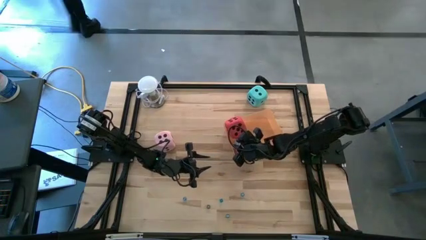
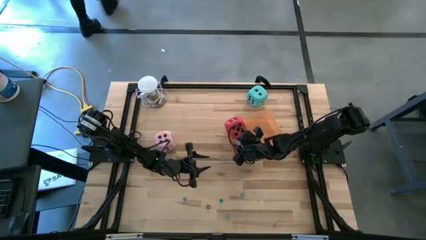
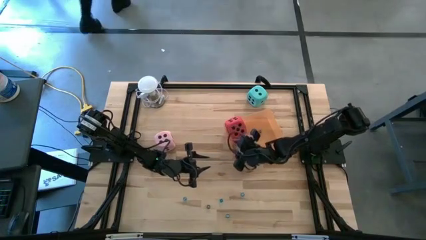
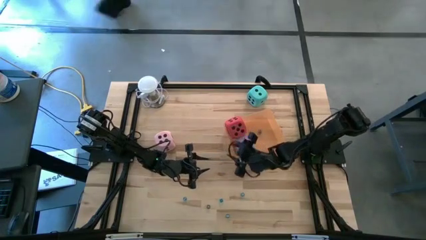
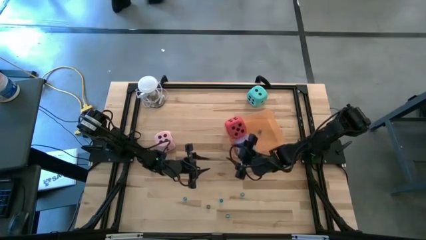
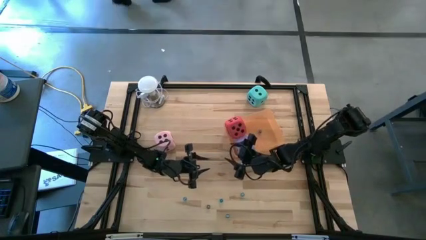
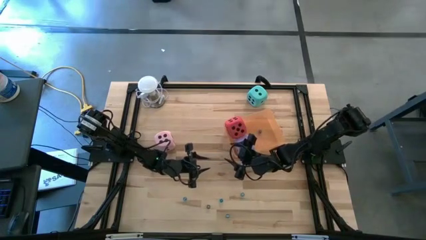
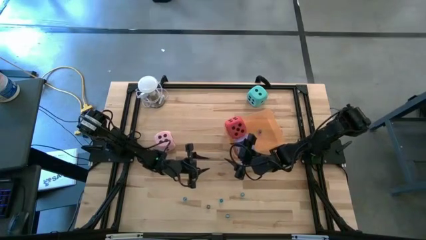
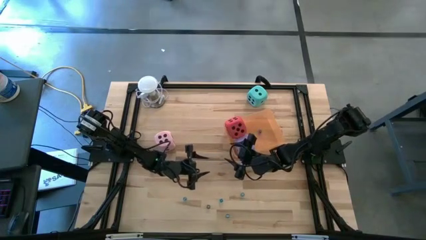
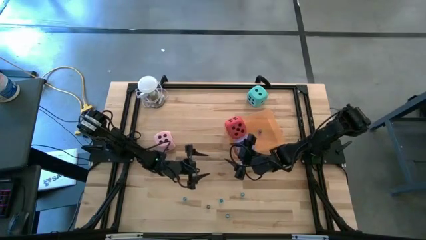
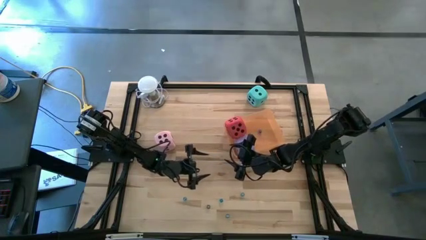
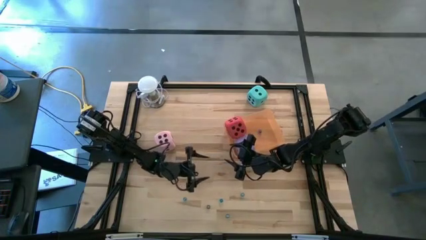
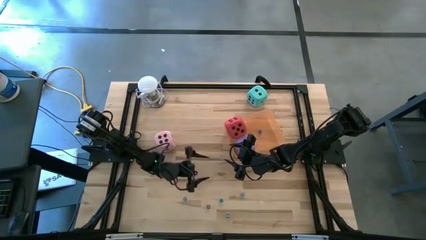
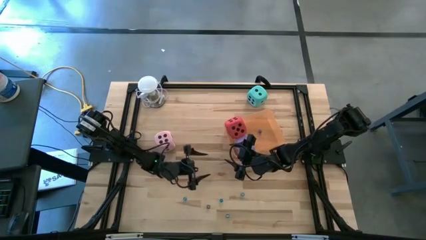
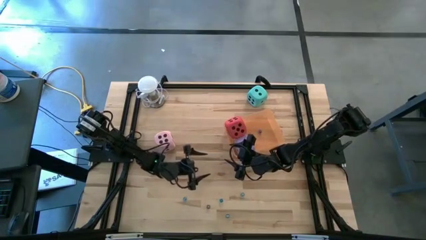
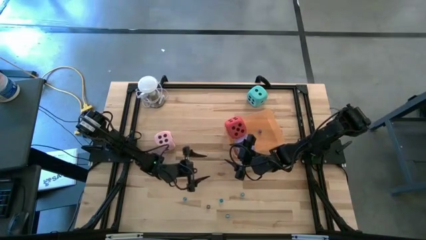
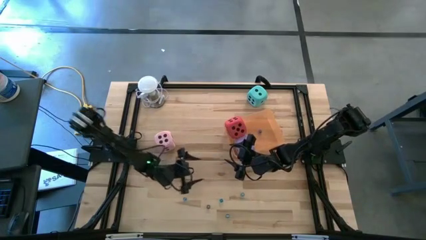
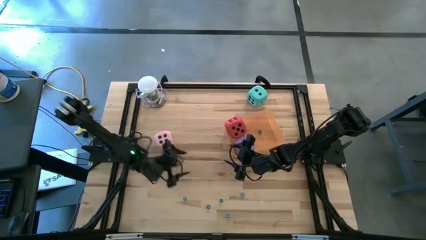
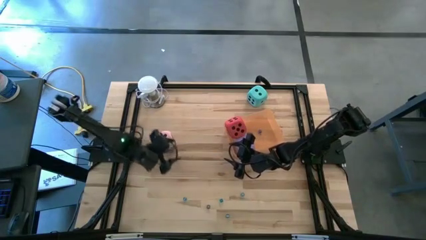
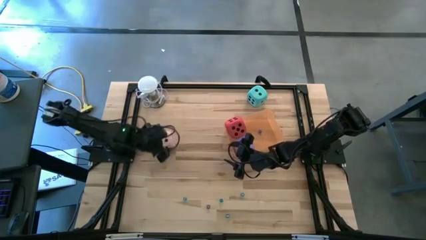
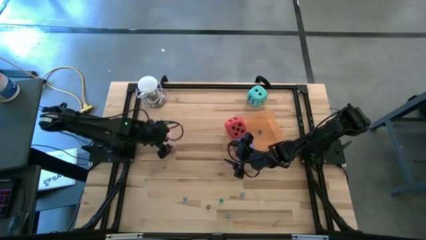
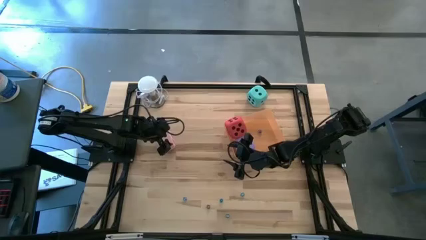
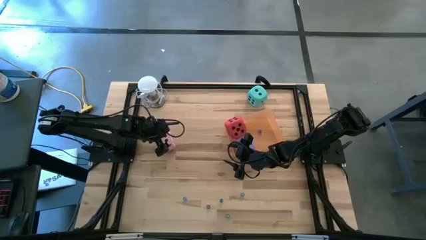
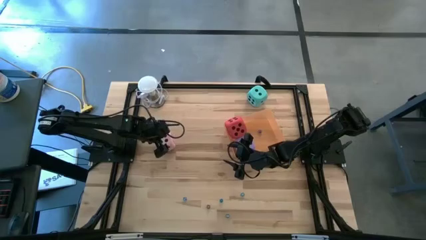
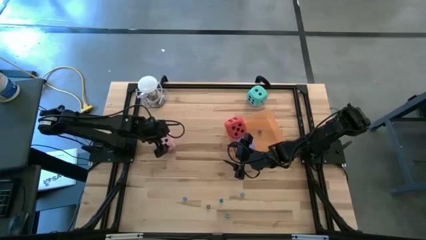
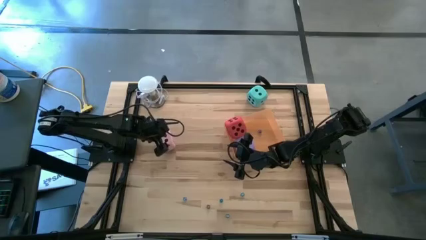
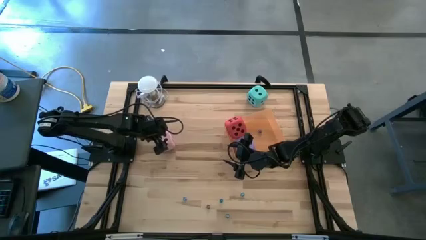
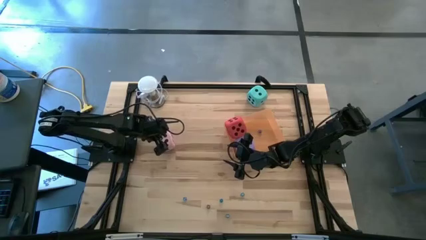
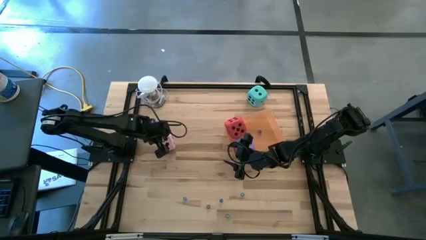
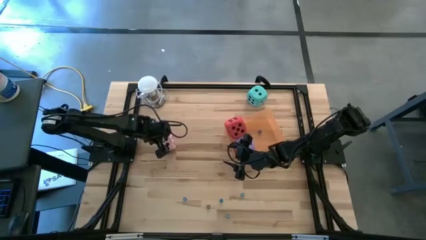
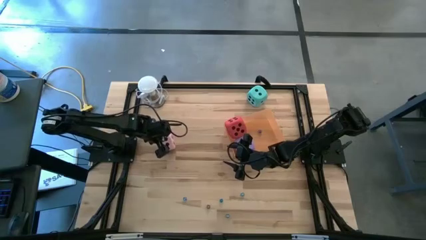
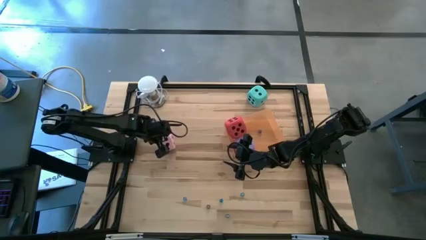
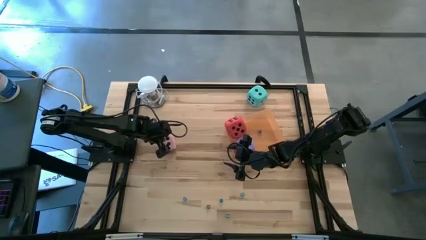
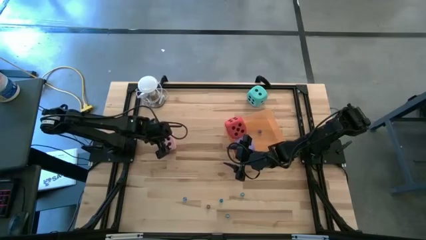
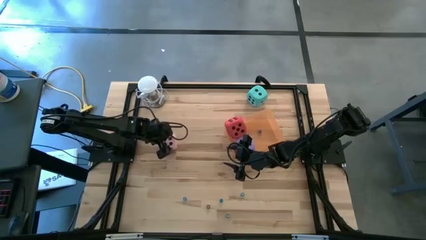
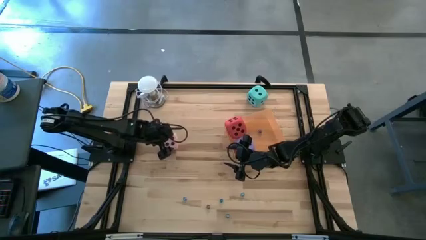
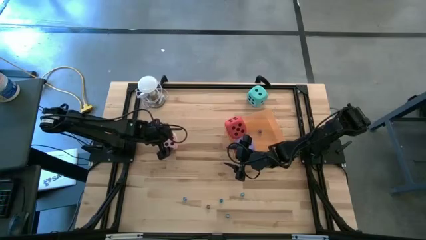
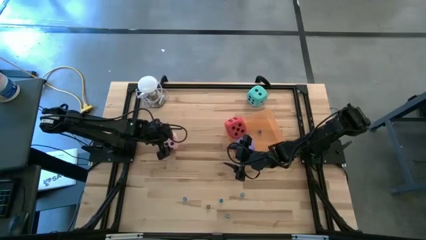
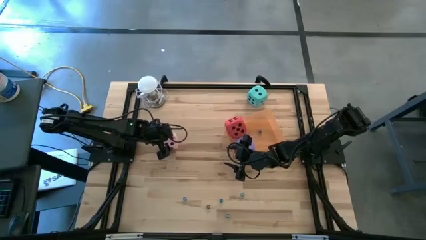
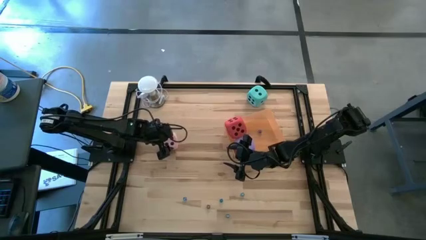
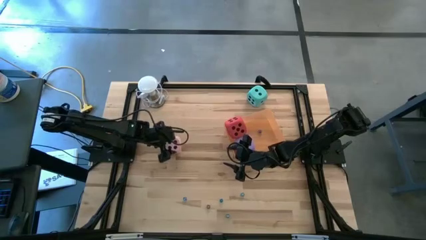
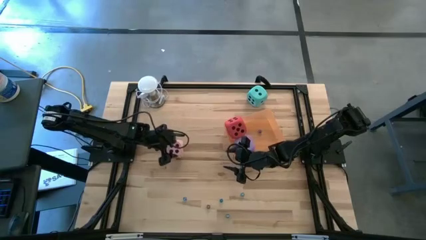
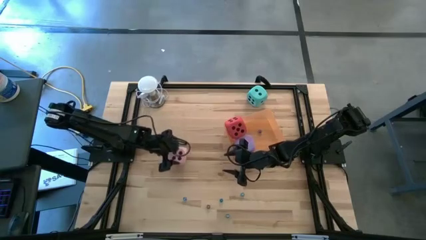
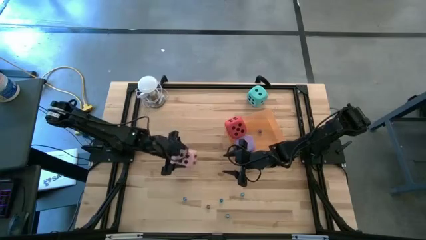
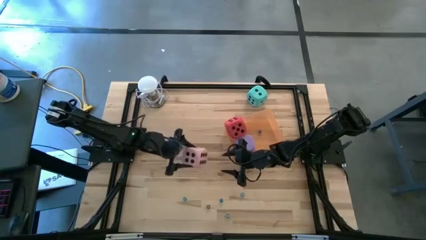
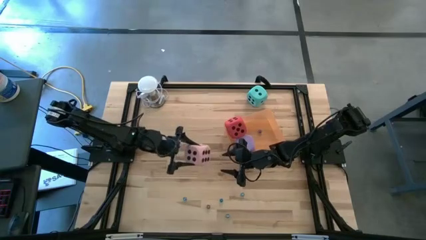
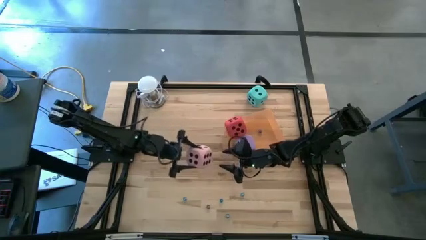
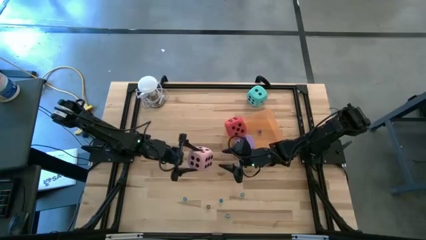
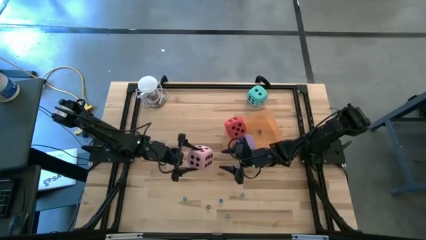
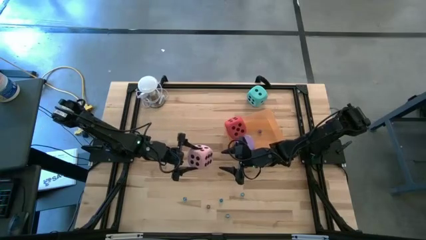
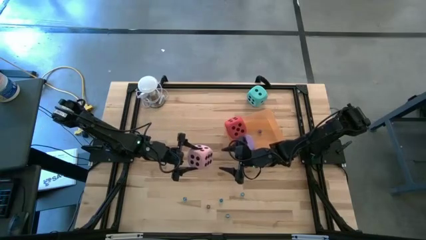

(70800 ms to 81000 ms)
Task: Pick & Place Dice
Put the large pink dice into the orange bin

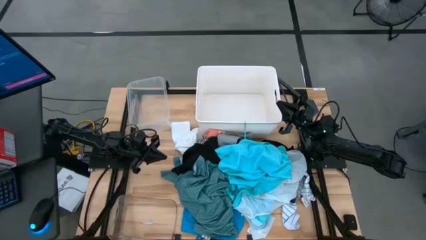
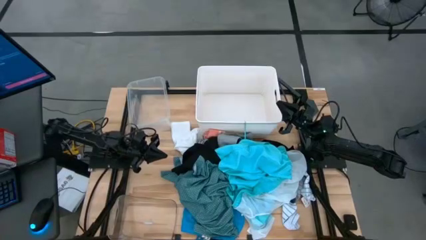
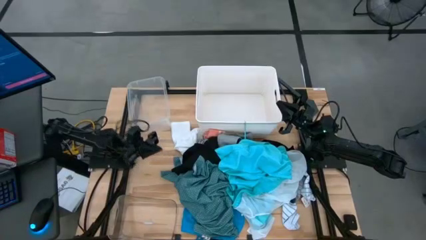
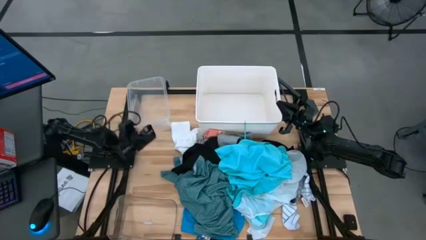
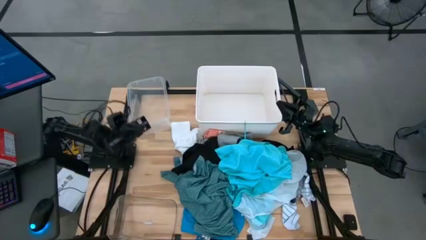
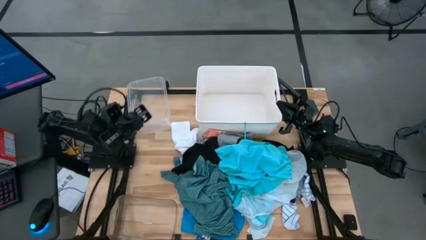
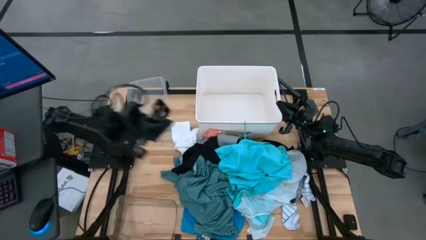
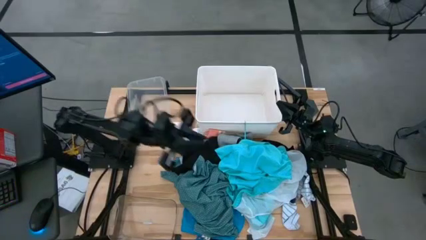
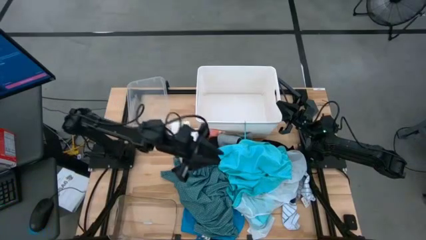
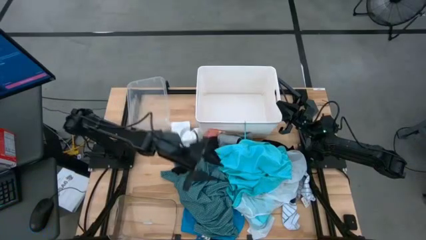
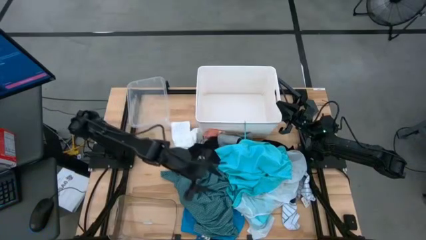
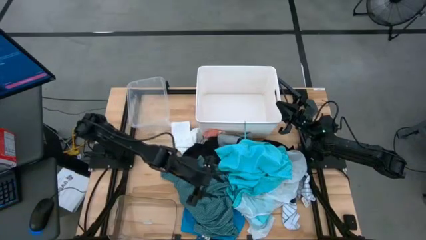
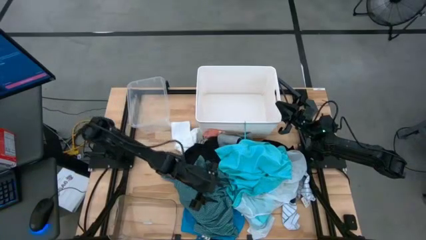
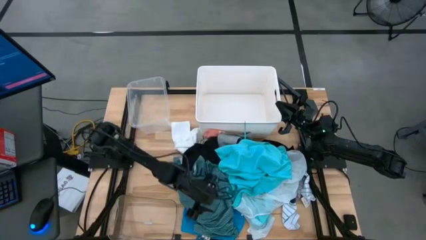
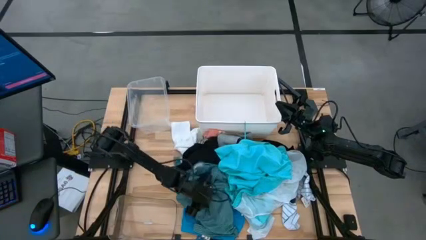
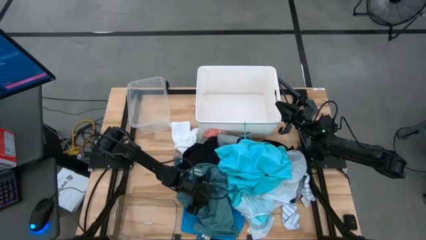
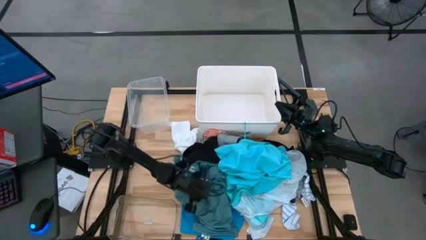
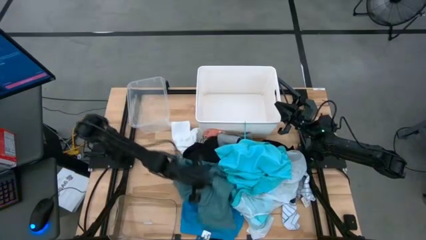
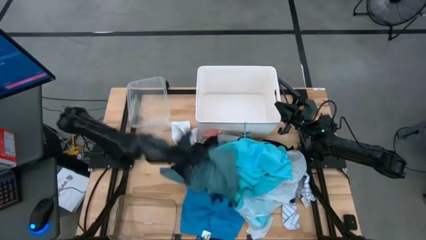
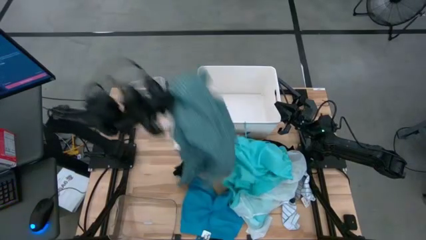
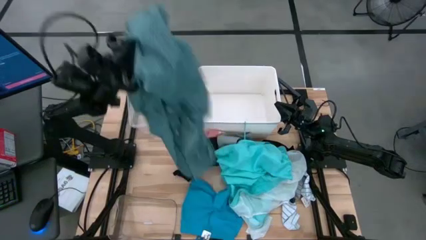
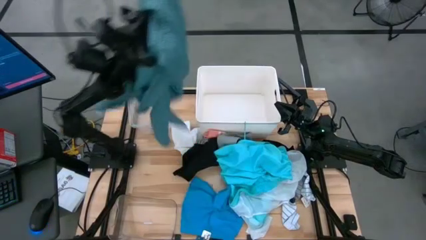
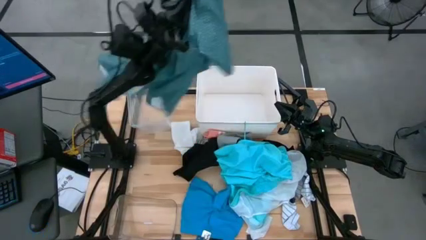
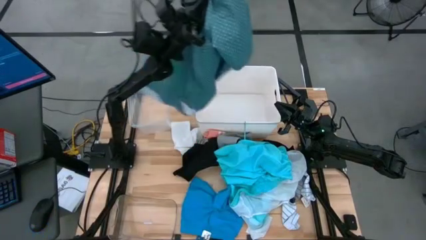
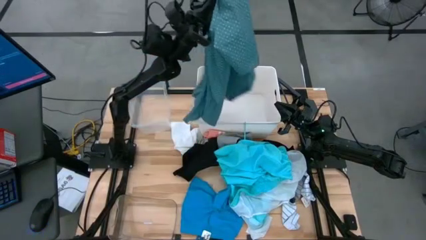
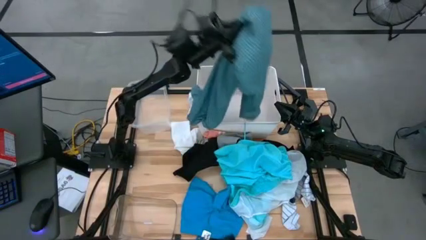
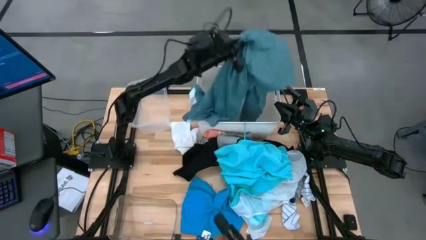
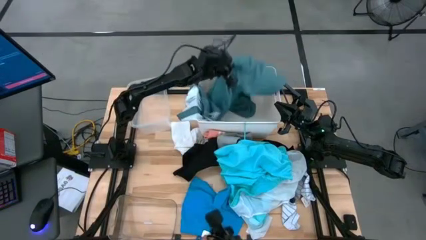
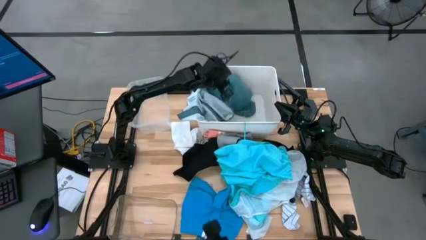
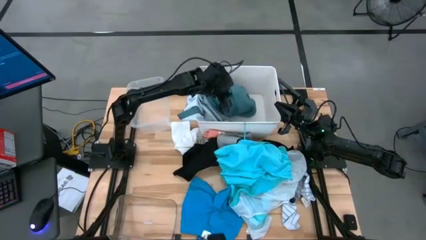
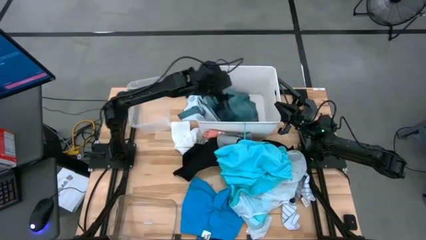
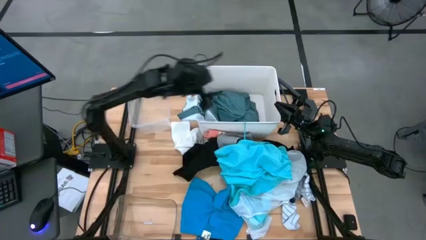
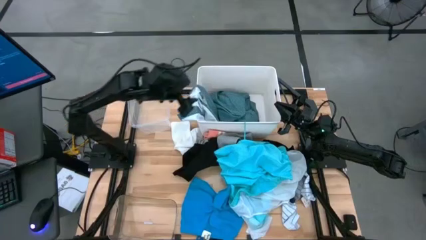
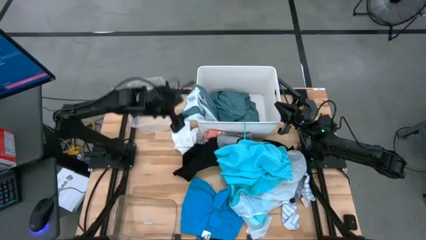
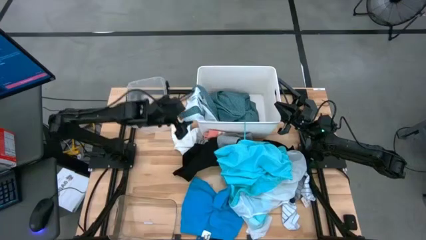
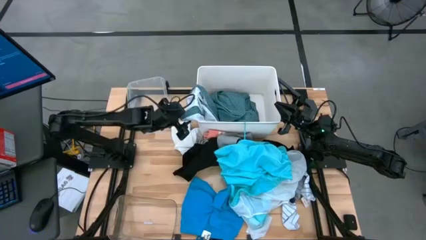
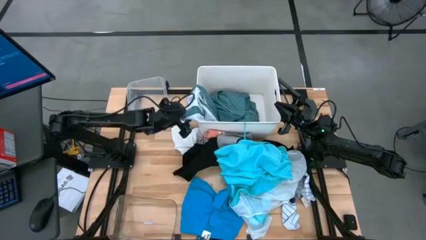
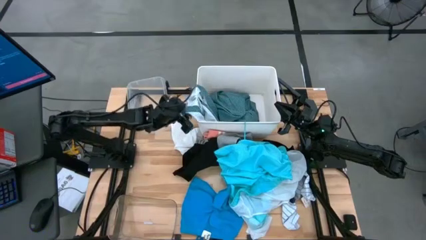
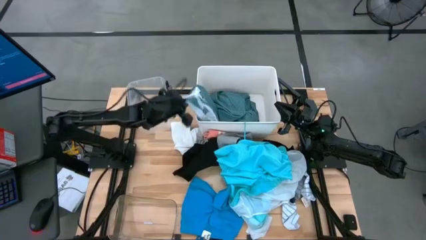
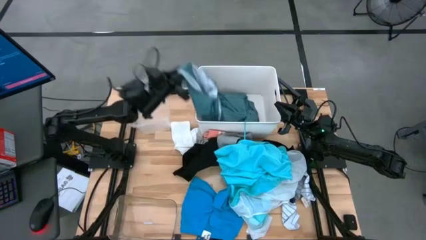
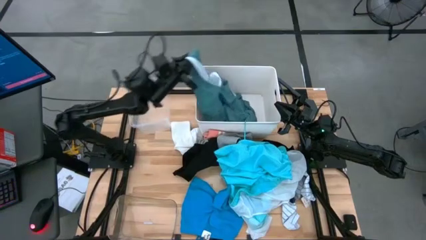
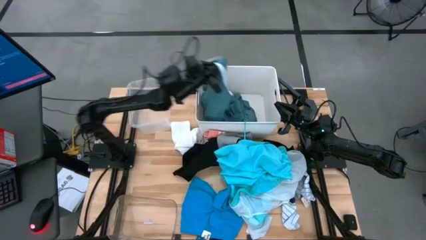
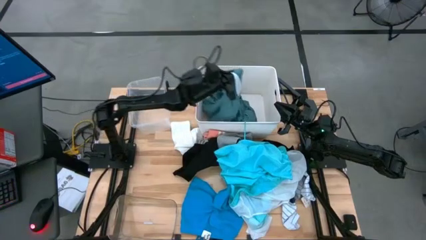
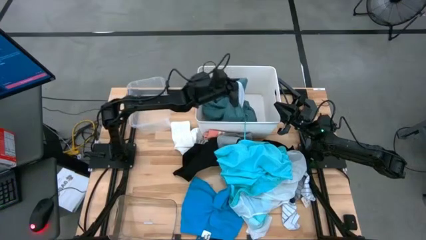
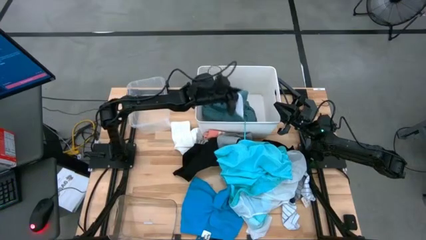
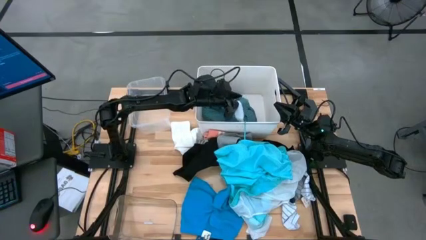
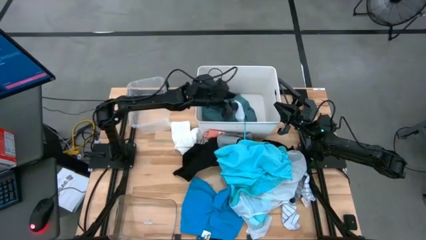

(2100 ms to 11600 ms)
Task: Pick & Place Cloths
Put the blue patterned polo shirt into the white laundry organizer
